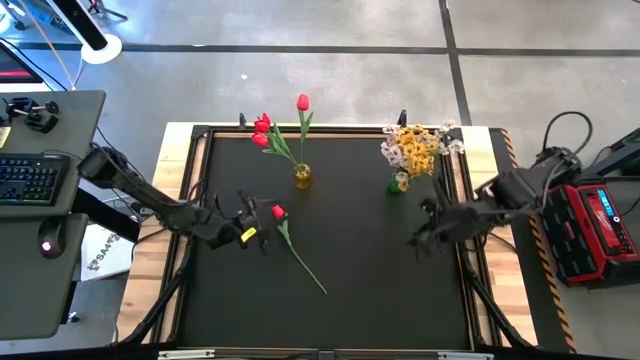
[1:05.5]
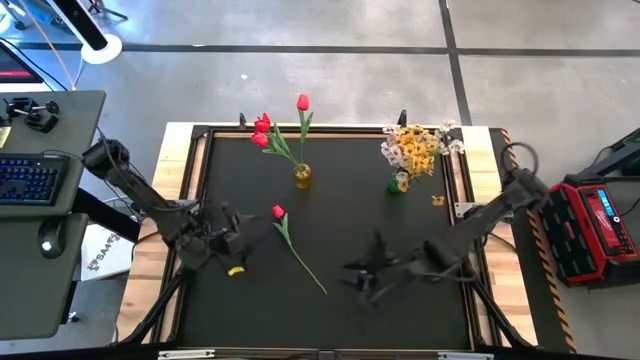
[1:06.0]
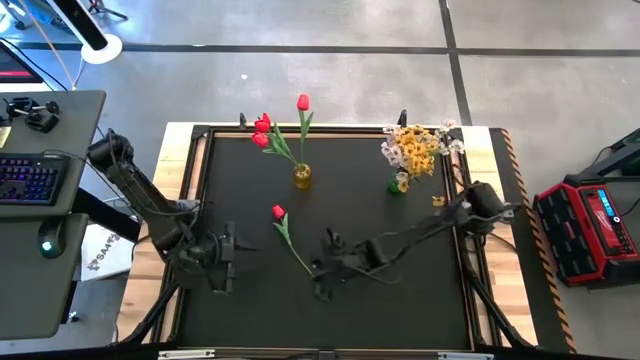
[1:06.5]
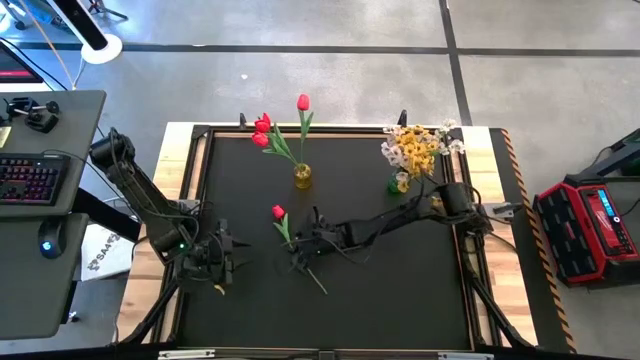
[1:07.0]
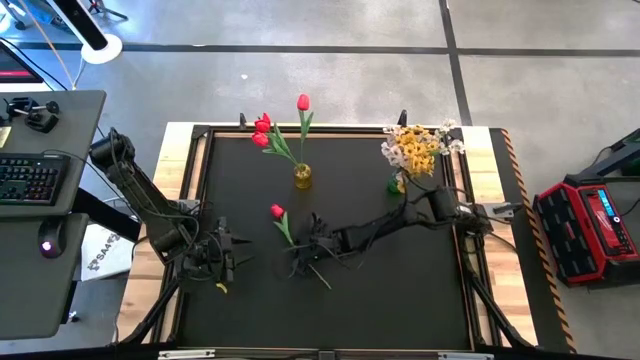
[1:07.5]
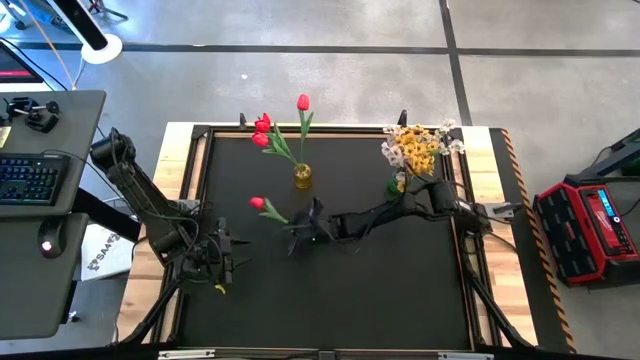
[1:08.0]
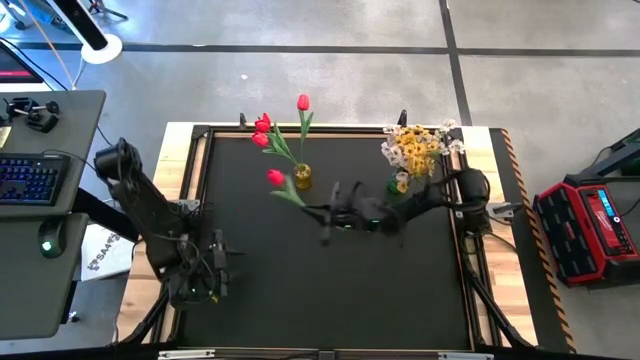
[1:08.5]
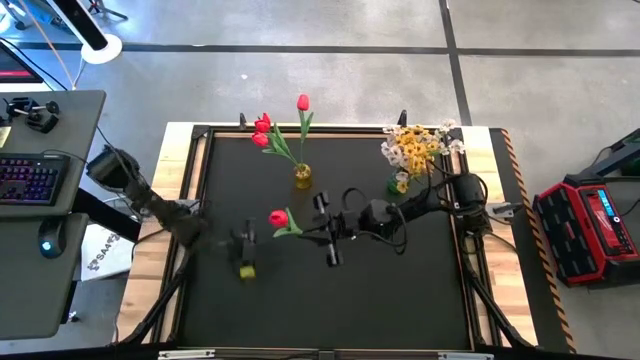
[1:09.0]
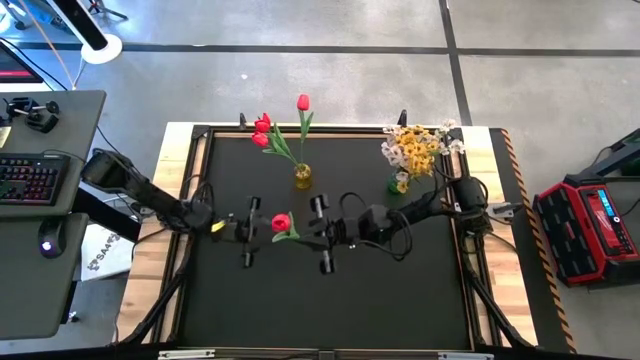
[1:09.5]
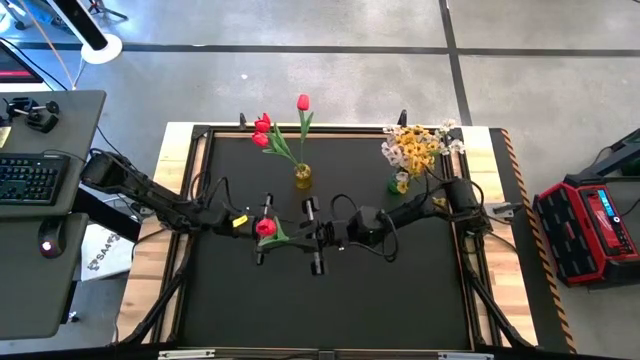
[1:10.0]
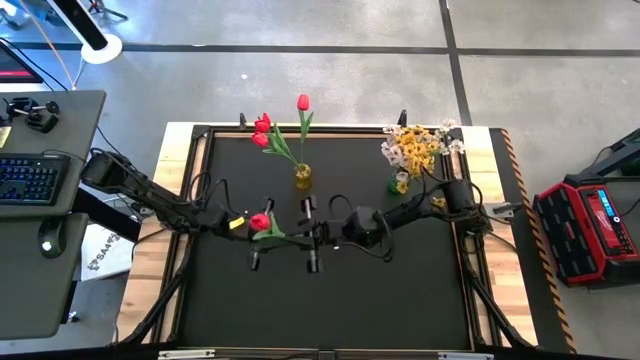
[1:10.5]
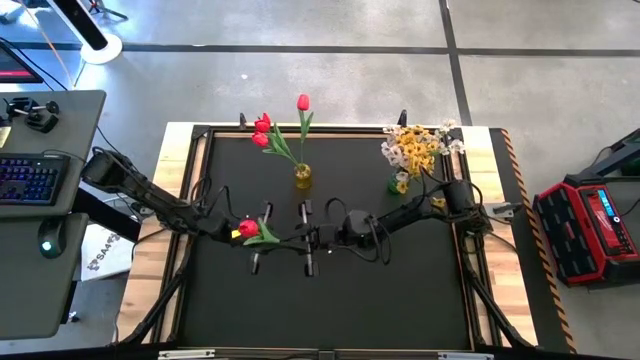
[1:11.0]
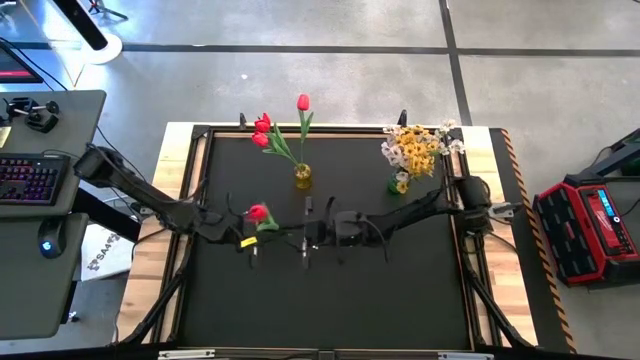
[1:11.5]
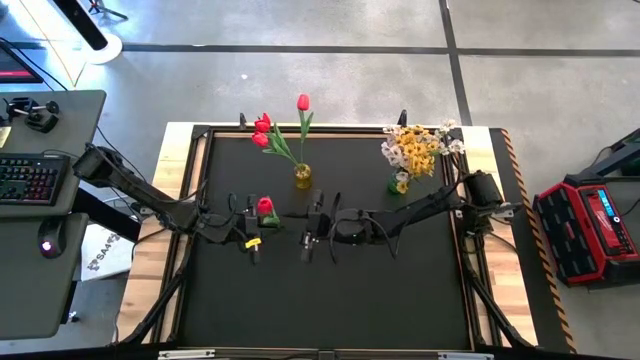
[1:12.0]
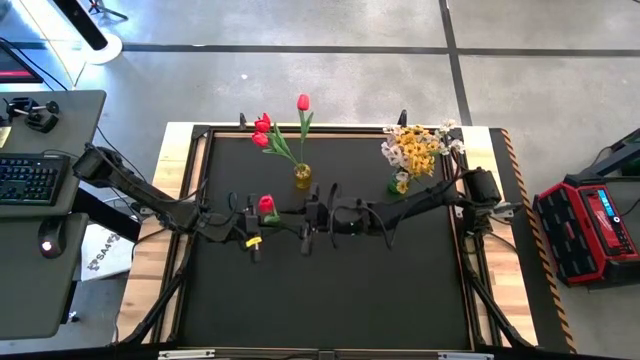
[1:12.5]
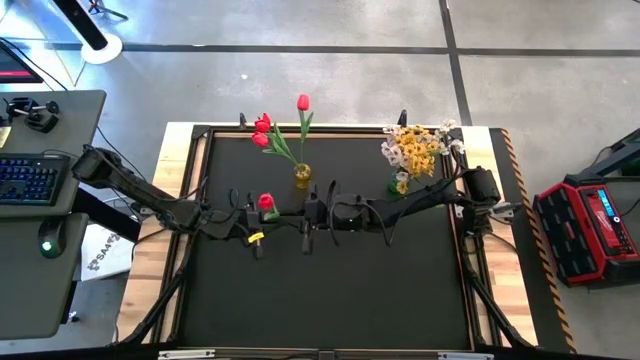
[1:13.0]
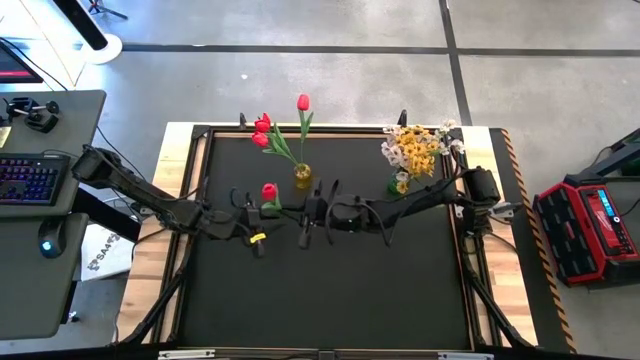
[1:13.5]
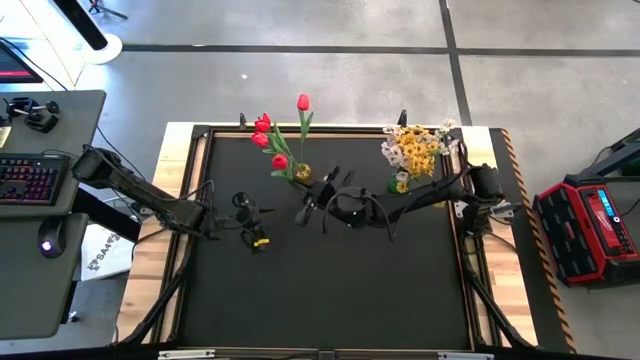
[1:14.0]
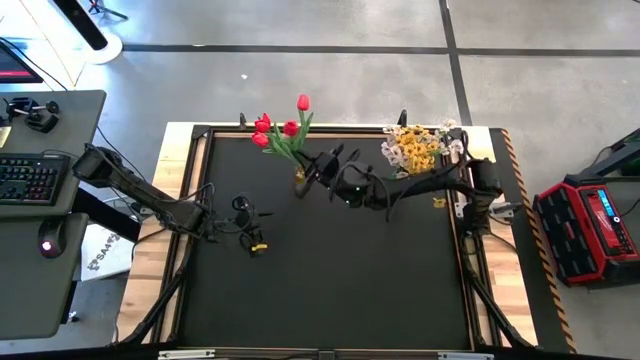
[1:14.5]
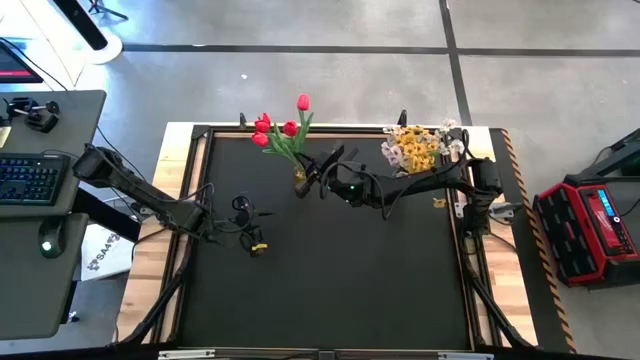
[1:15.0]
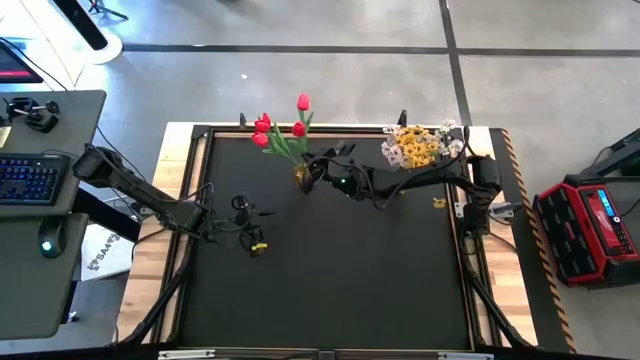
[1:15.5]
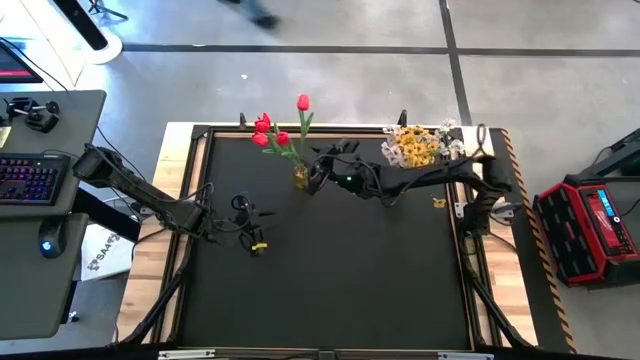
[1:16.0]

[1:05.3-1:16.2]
Task: Sort flowers into vase by color
Put the red tulip into the yellow vase

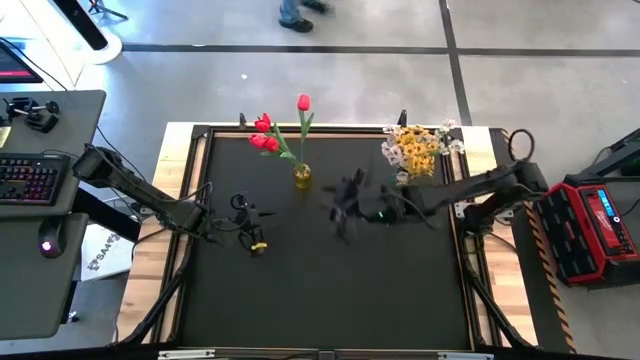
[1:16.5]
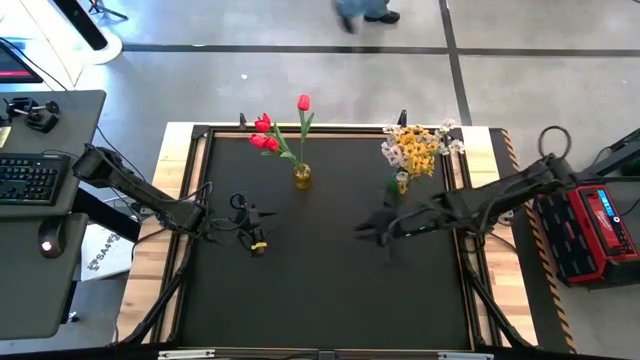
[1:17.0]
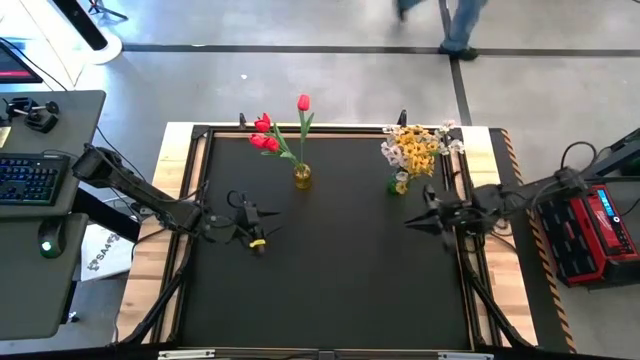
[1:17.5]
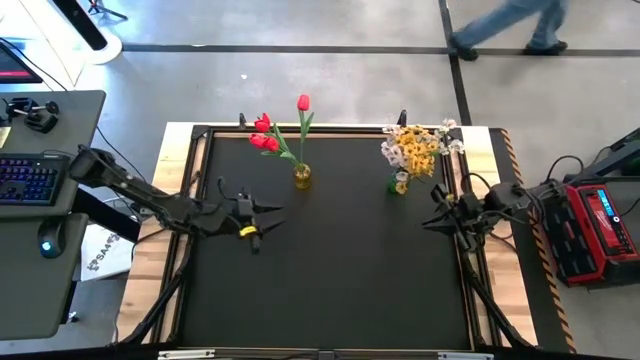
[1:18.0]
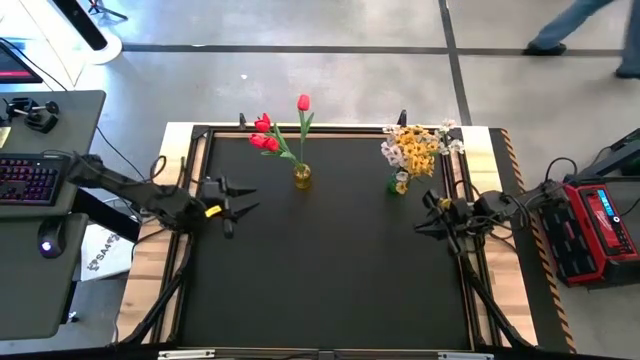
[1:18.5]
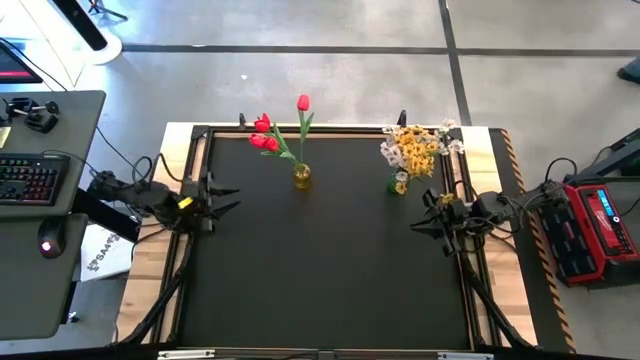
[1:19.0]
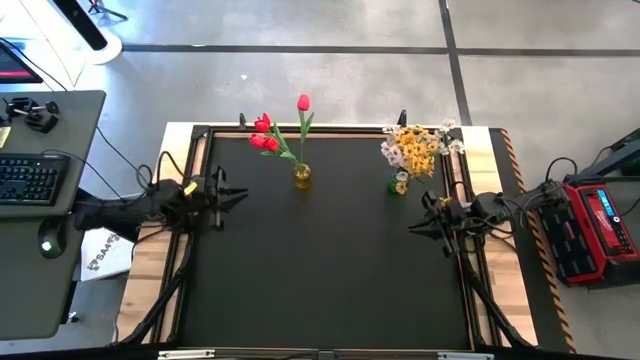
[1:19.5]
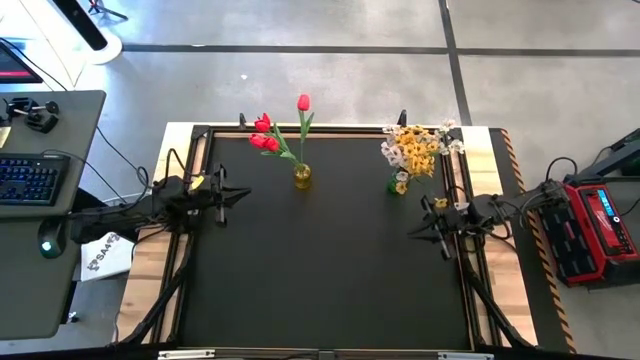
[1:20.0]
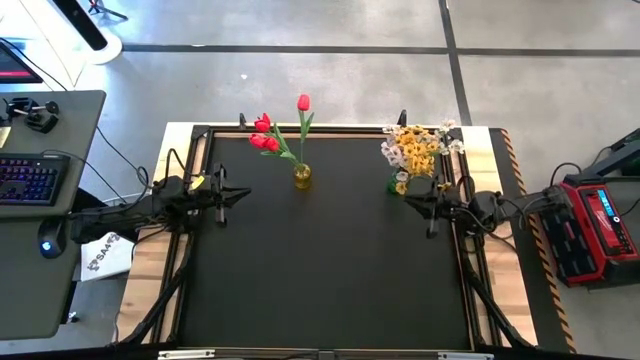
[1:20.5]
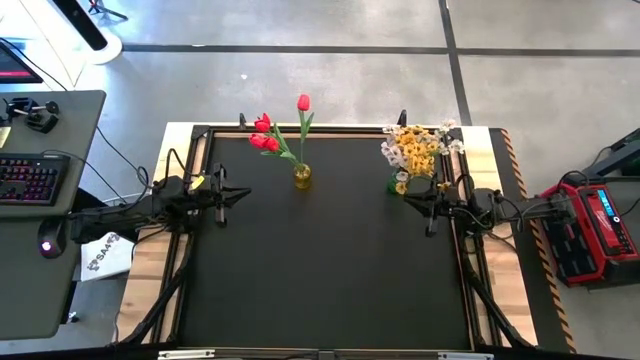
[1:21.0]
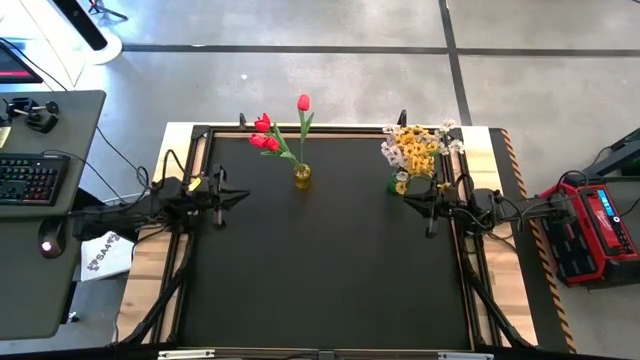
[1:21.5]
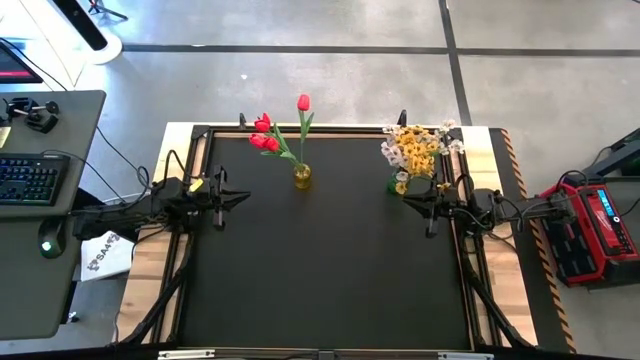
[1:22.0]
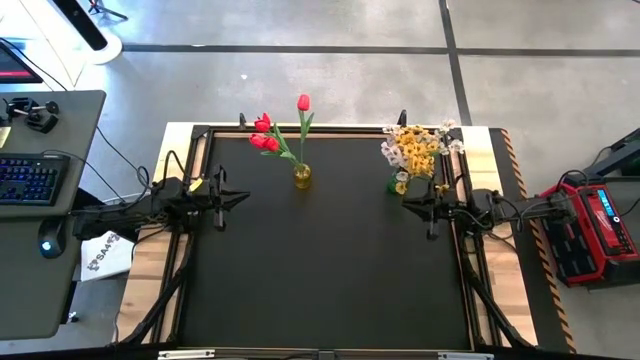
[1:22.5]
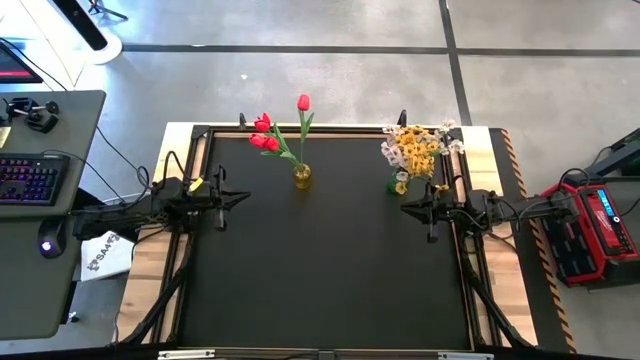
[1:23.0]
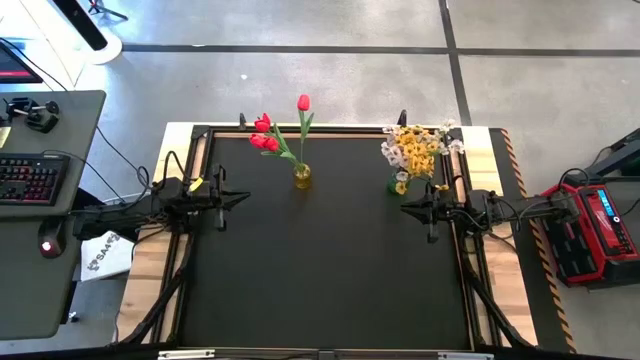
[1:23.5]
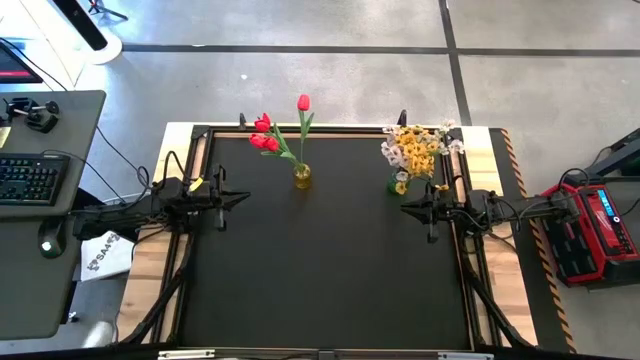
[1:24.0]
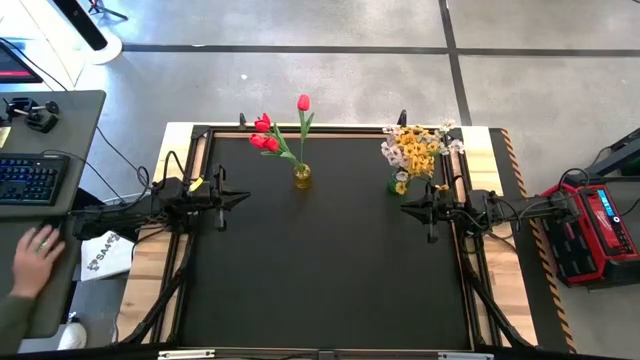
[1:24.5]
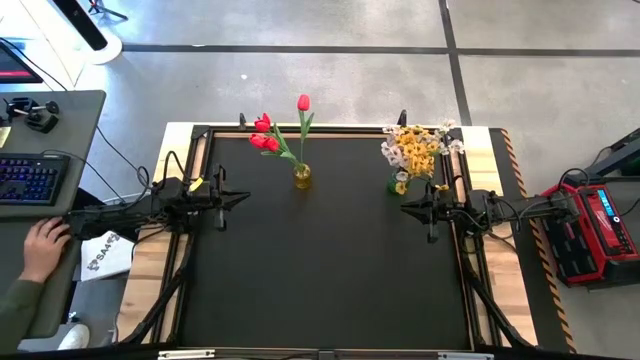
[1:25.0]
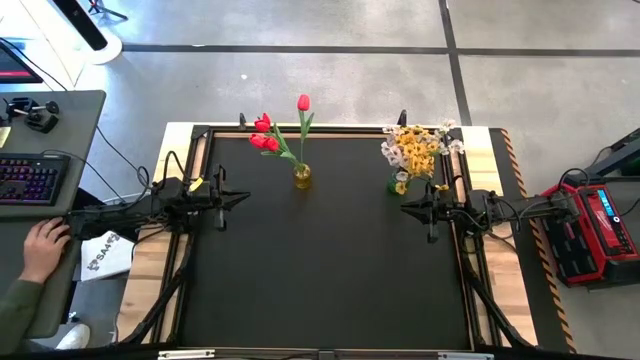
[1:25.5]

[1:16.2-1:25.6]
Return to Home Position

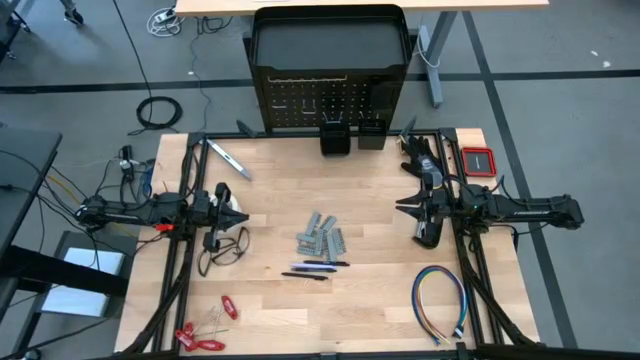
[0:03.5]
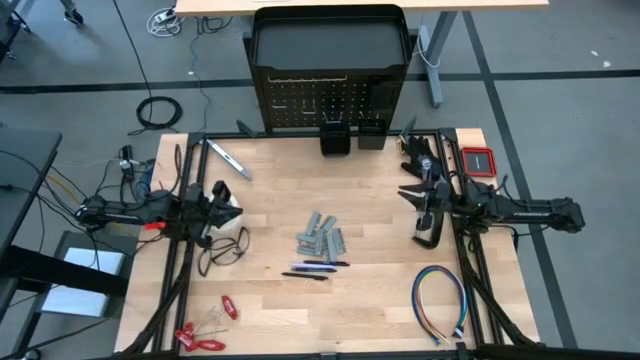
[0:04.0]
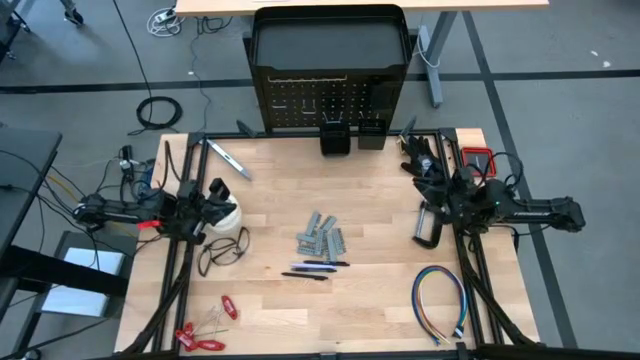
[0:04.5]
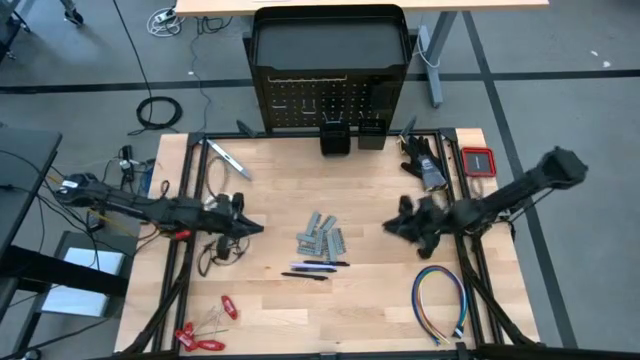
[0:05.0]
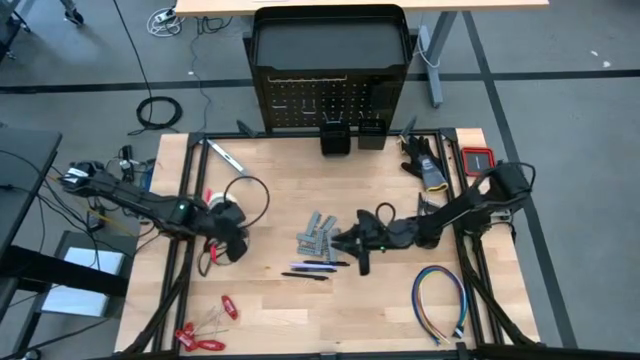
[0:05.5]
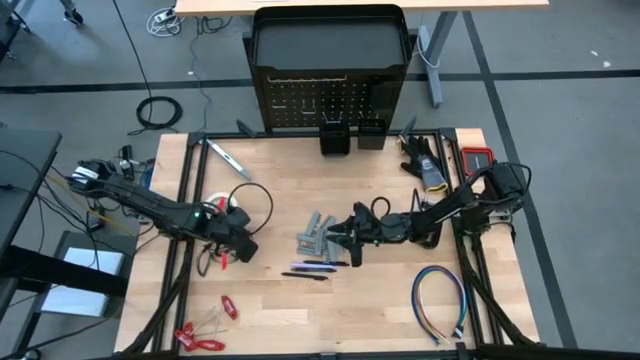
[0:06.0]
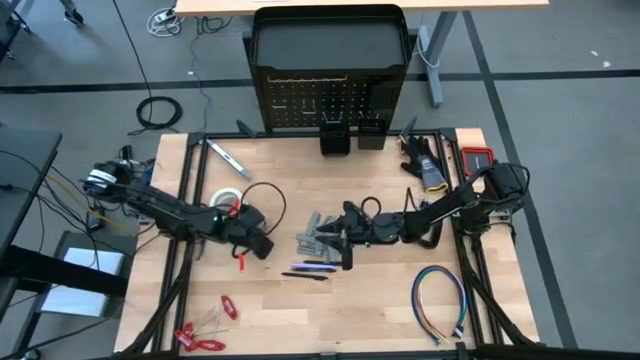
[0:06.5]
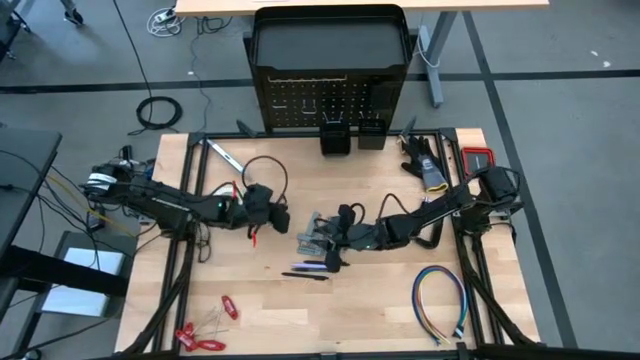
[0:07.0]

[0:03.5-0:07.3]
Task: Hang tools onto peg board
Move the black safety glasses to the center of the table
